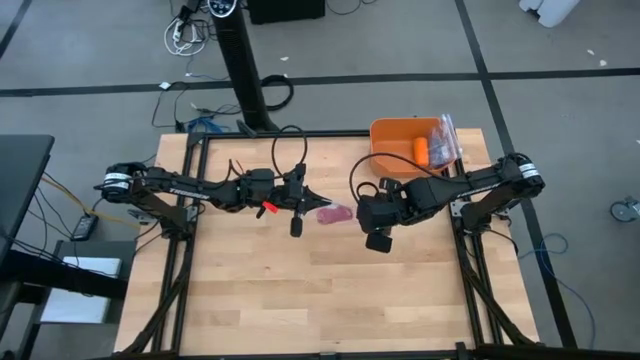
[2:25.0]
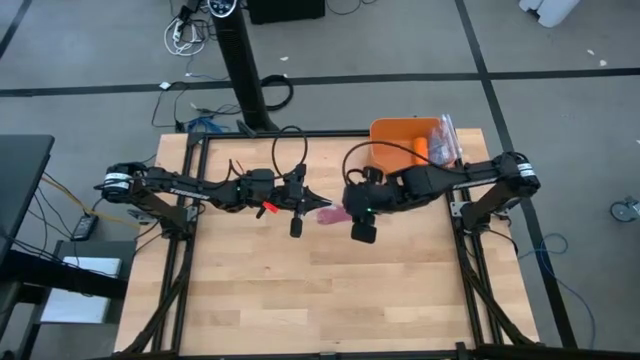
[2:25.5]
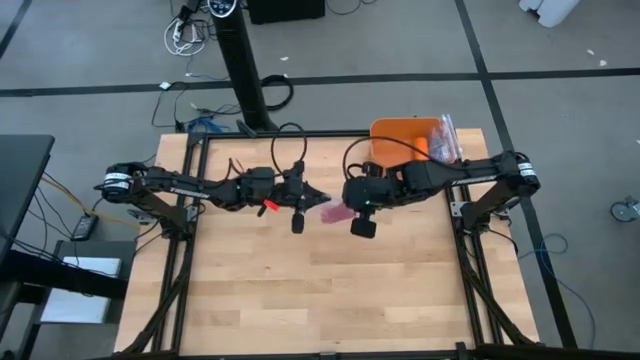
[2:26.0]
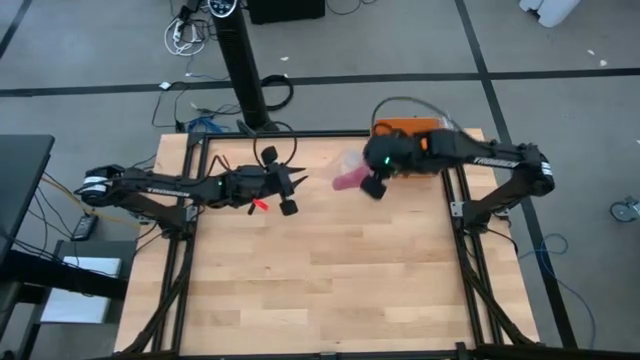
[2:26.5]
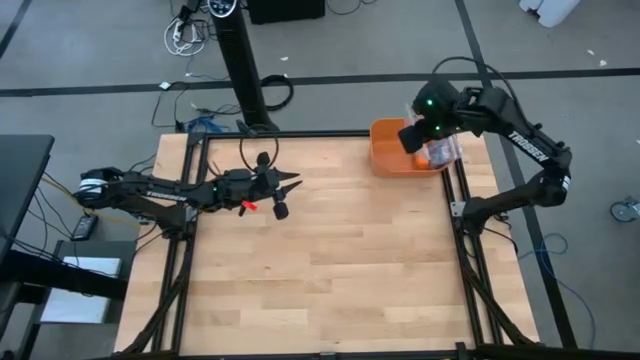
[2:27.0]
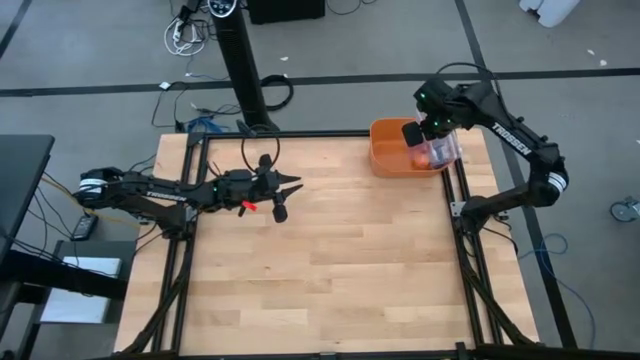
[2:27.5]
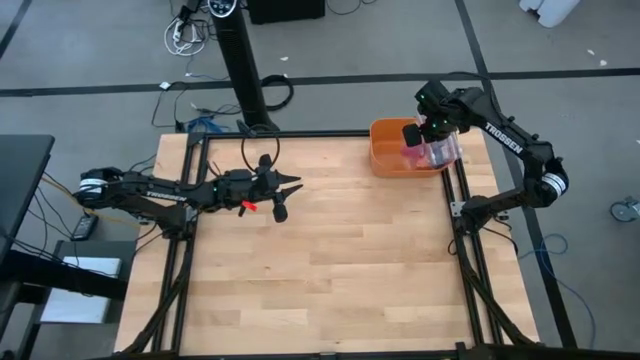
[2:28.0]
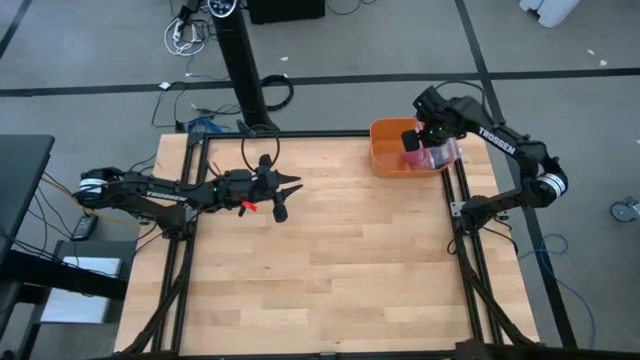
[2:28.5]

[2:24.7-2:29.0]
Task: Roll bandage
Put the packed pink bandage into the orange bin

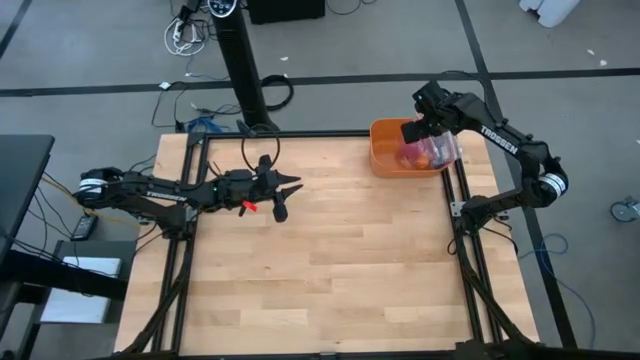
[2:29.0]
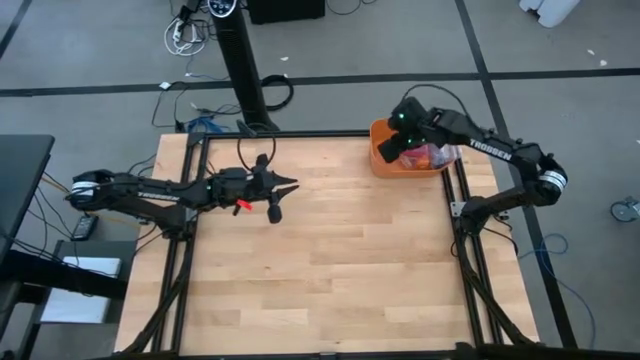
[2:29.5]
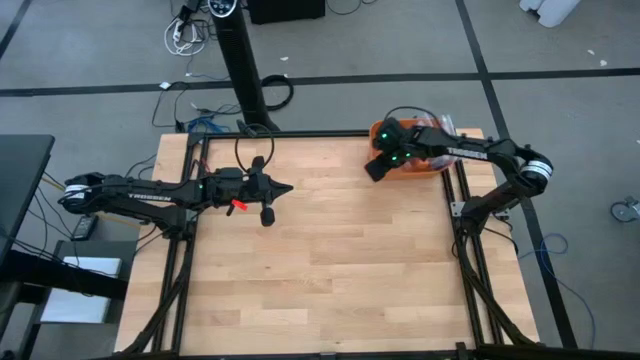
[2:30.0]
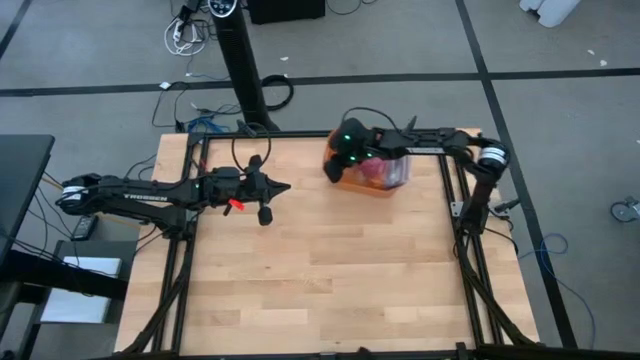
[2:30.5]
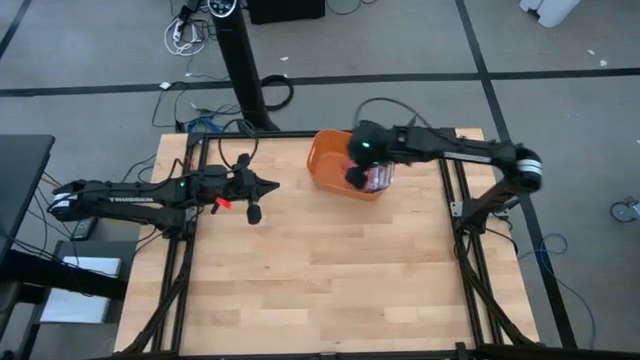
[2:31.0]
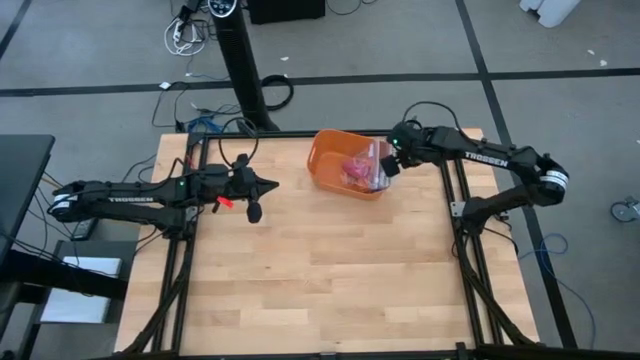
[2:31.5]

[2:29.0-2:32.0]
Move the orange bin to the top center of the table

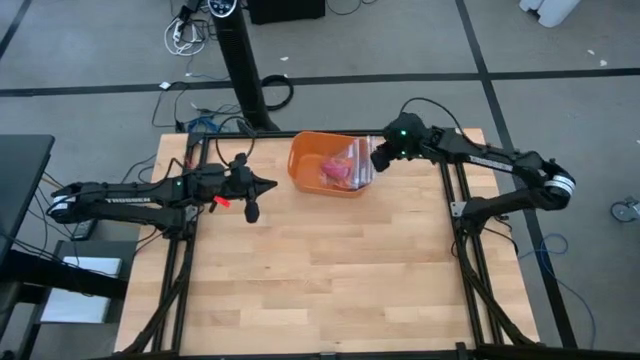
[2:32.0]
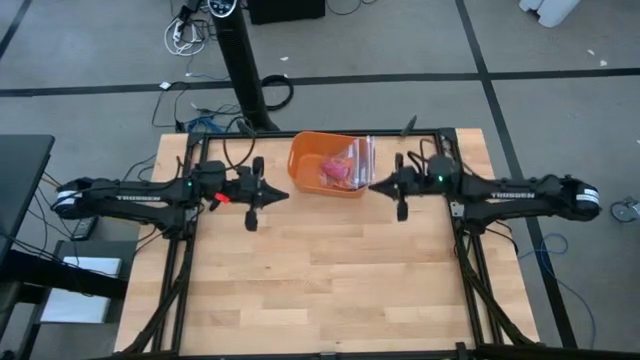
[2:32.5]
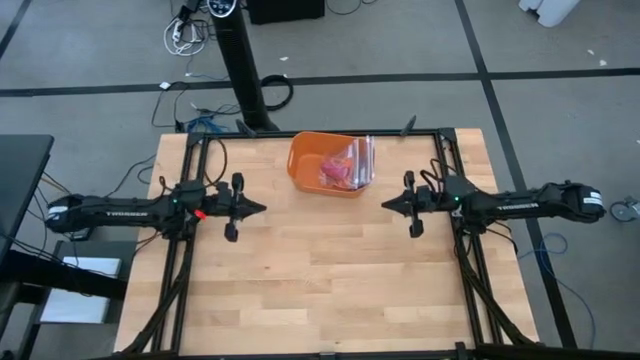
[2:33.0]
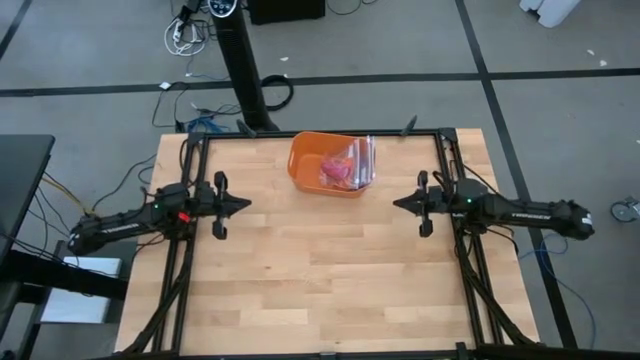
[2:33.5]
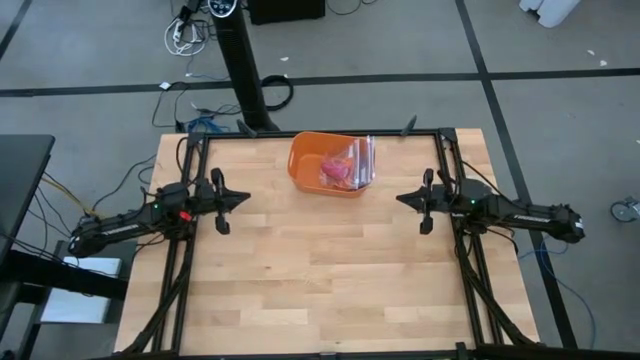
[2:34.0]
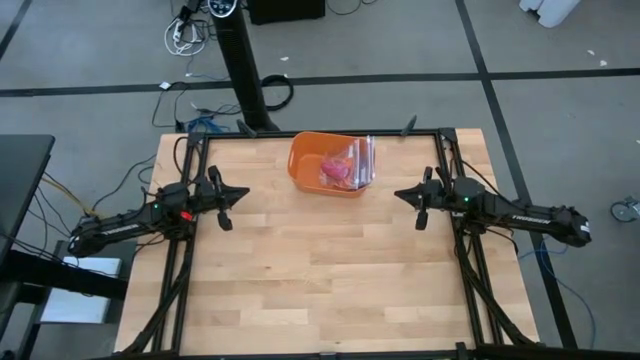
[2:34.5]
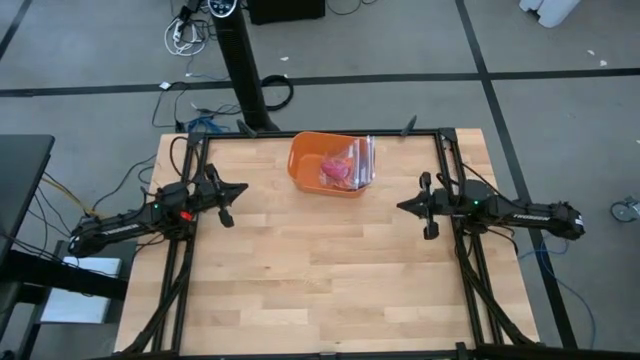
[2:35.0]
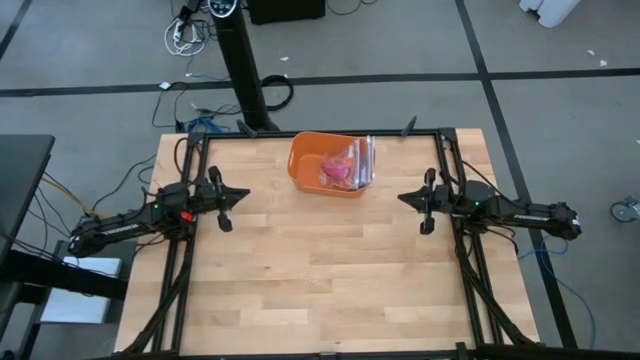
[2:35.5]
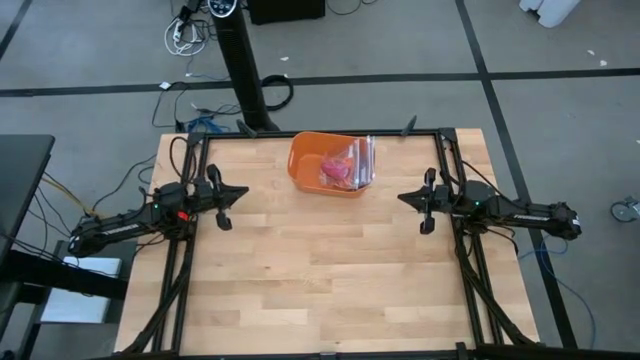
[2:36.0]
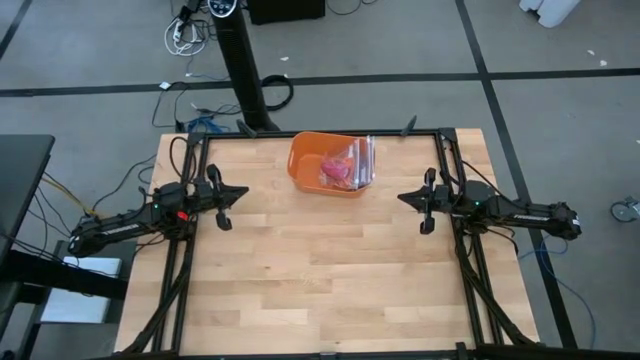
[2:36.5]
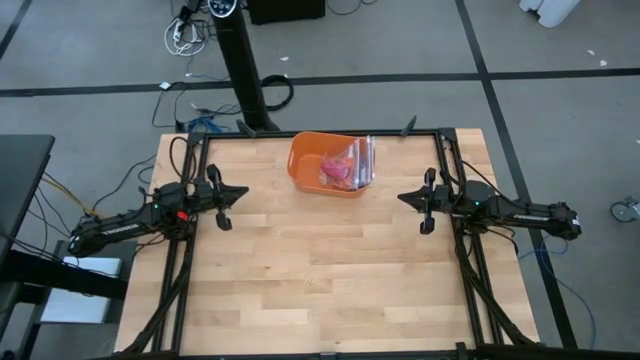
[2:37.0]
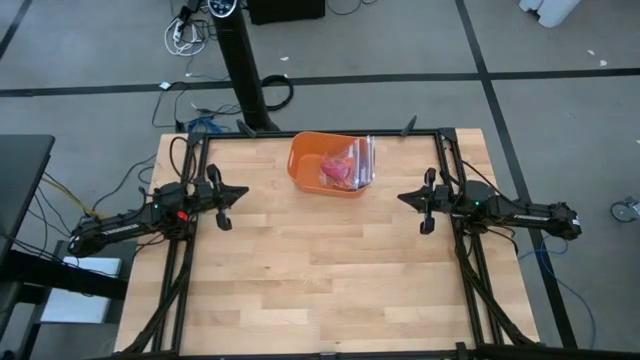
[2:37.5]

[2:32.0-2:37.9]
Return to Home Position

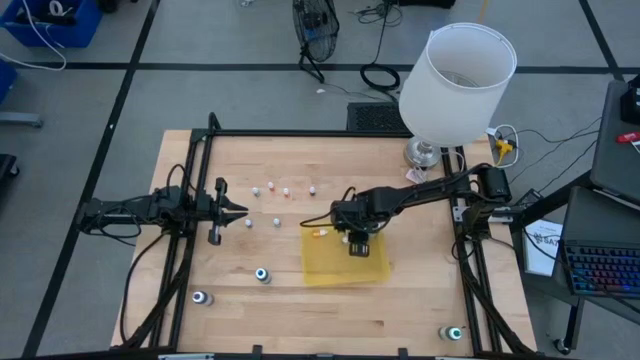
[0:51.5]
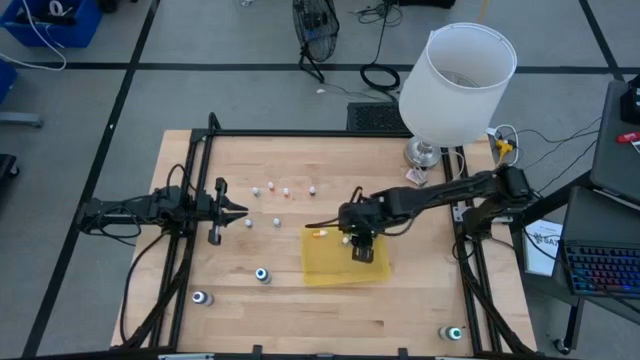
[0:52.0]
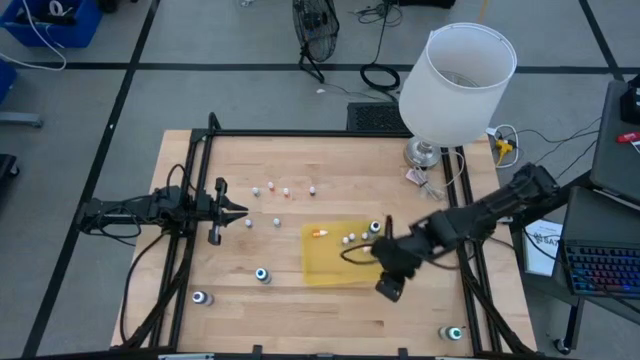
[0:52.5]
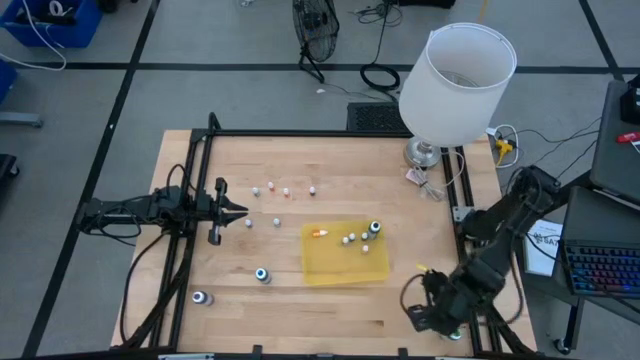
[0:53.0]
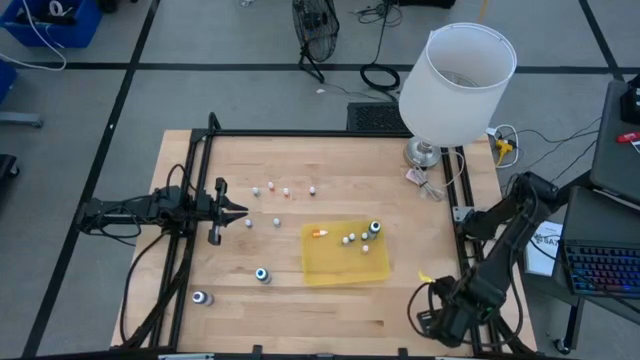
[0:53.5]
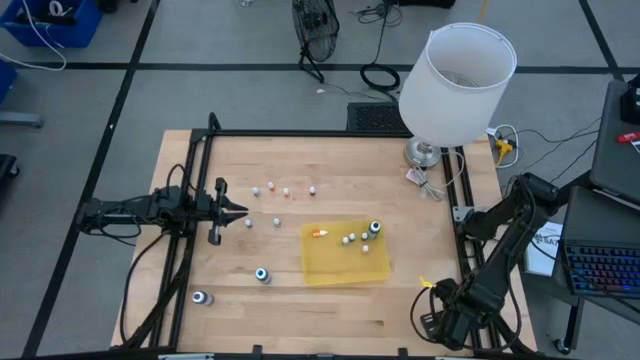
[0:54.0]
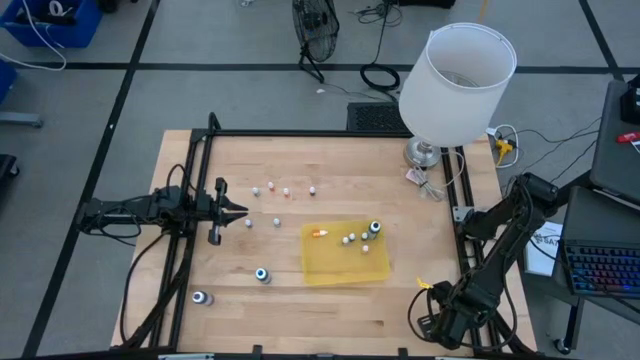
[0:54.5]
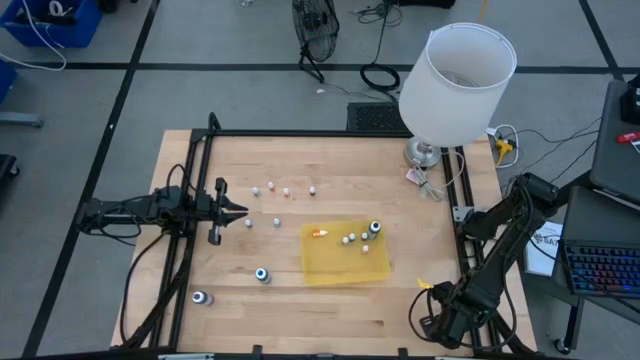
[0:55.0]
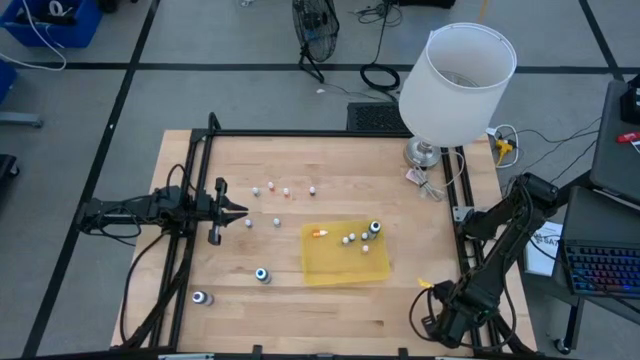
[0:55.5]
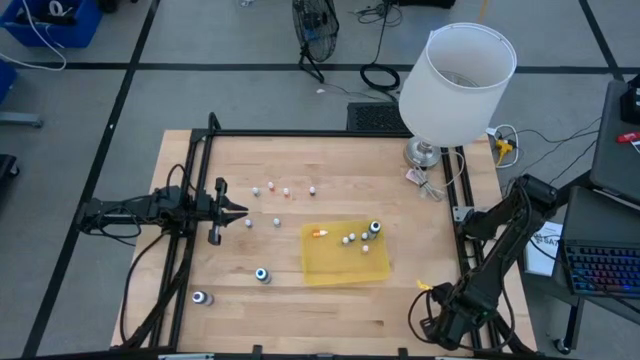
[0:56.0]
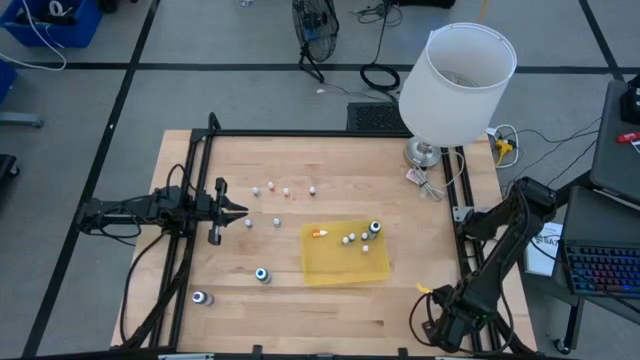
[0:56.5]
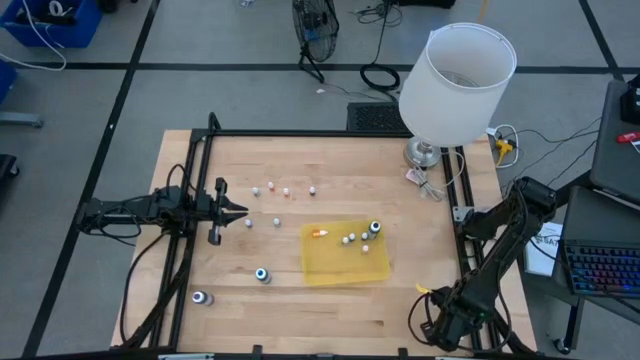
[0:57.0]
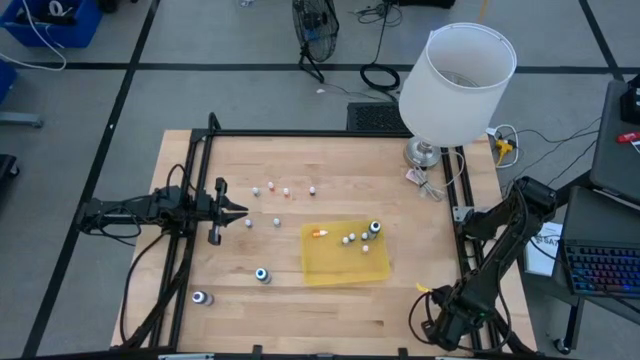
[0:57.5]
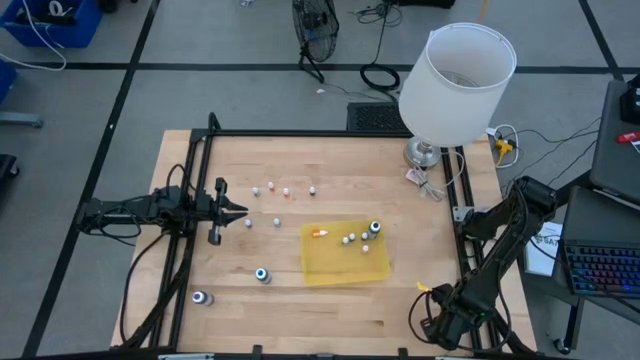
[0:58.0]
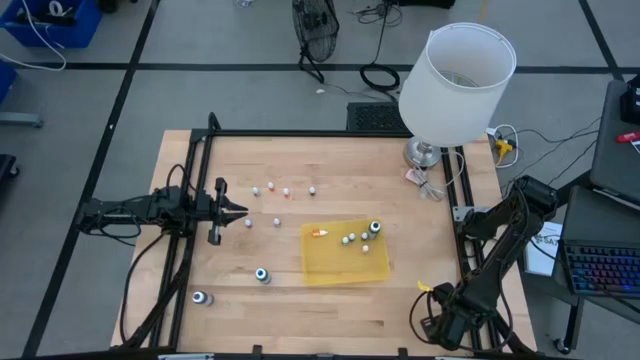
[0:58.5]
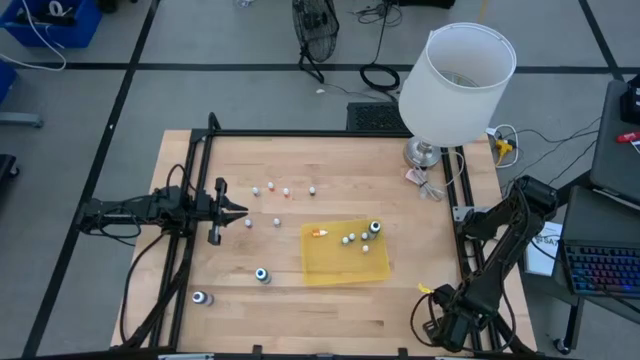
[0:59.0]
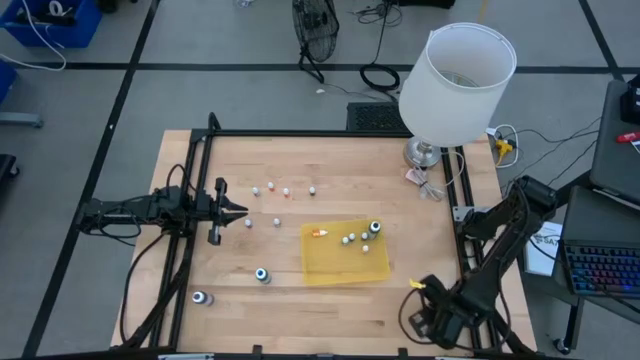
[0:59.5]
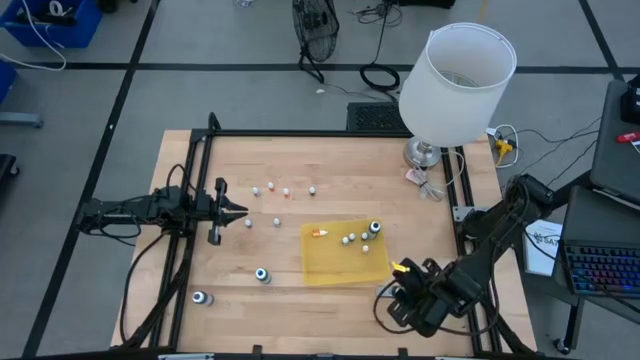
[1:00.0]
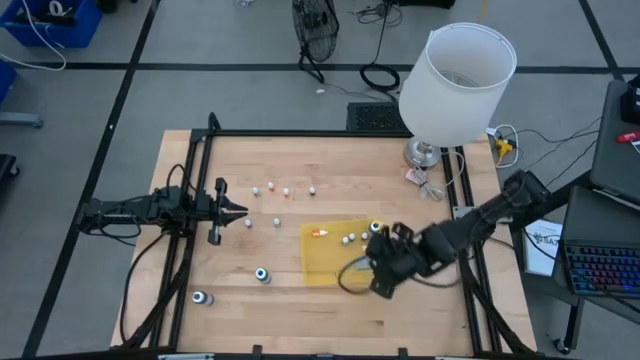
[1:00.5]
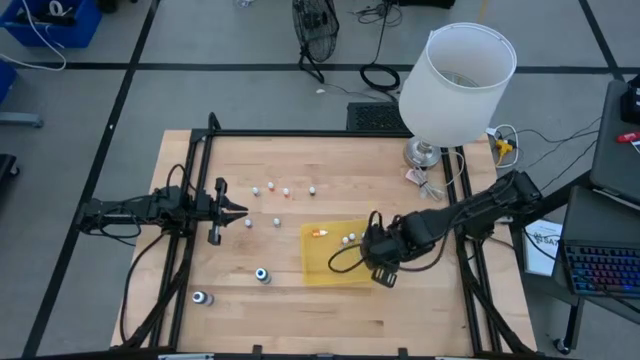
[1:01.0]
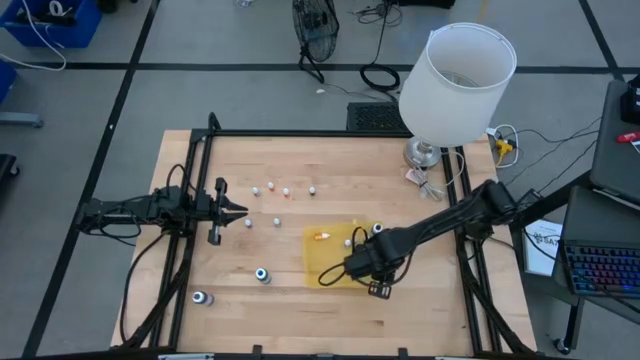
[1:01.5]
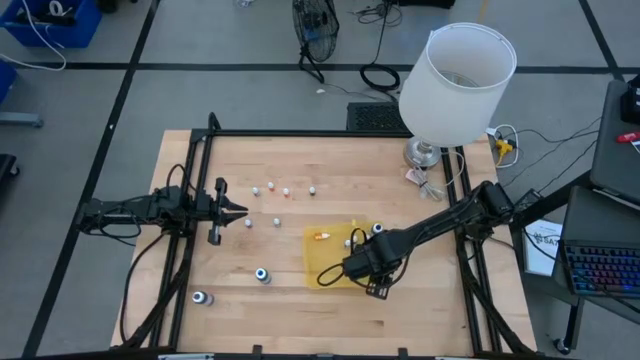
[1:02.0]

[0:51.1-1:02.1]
Task: Pick & Place food coloring
Put the large green food coloring bottle into the yellow bin
